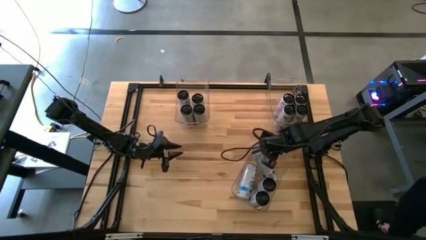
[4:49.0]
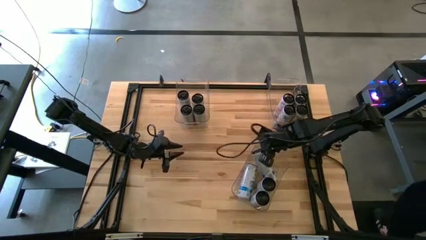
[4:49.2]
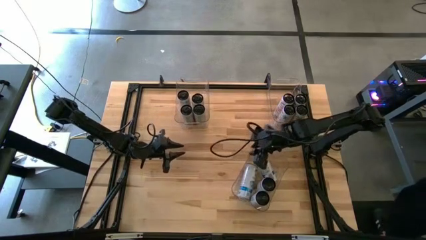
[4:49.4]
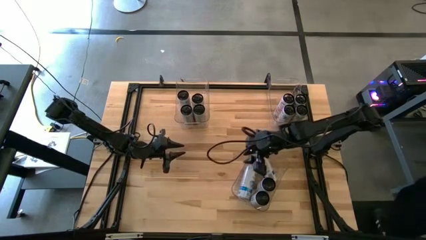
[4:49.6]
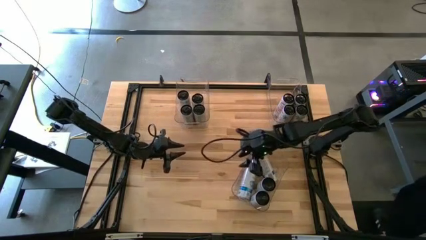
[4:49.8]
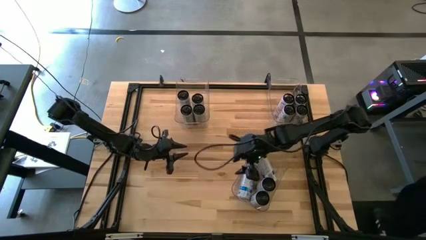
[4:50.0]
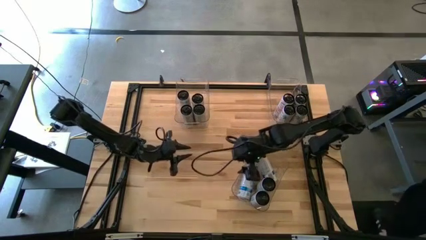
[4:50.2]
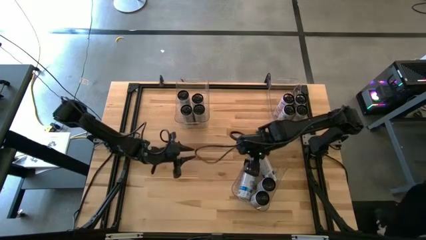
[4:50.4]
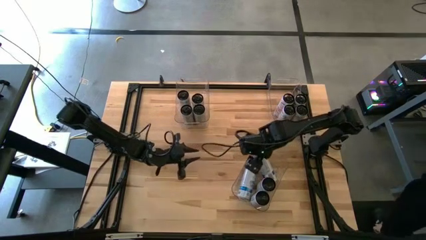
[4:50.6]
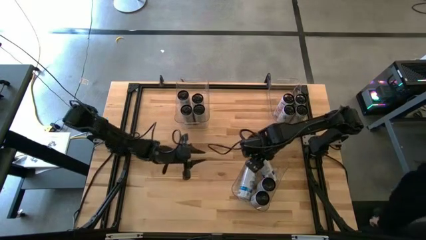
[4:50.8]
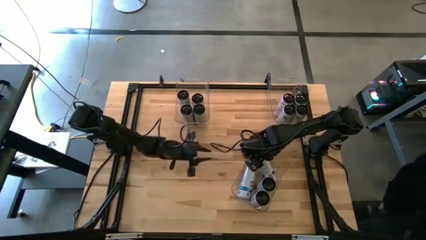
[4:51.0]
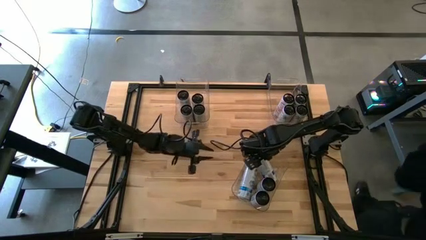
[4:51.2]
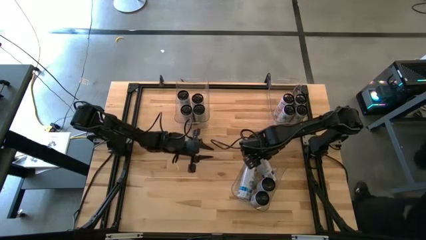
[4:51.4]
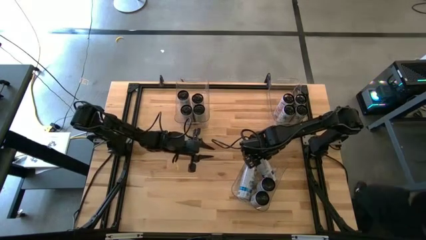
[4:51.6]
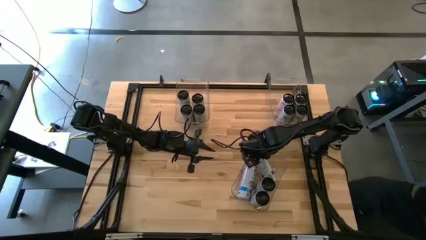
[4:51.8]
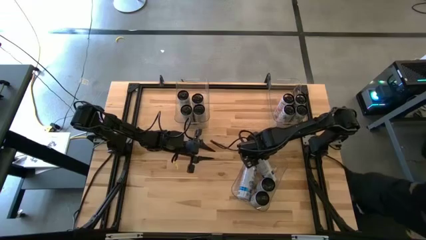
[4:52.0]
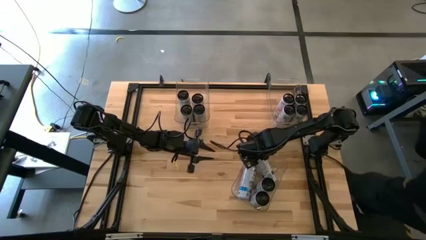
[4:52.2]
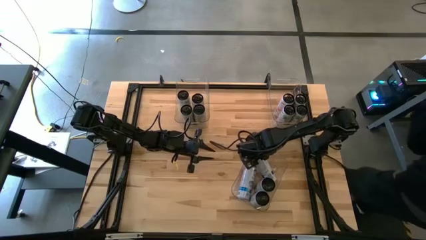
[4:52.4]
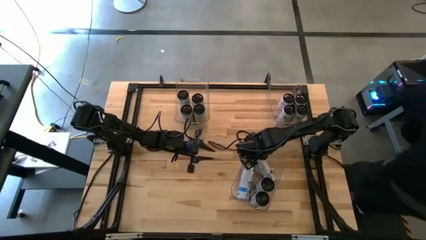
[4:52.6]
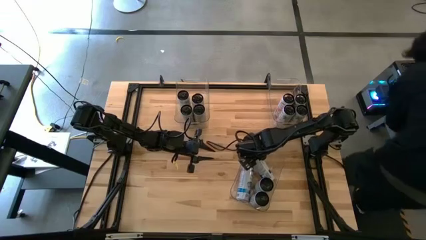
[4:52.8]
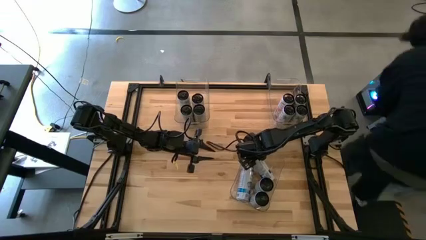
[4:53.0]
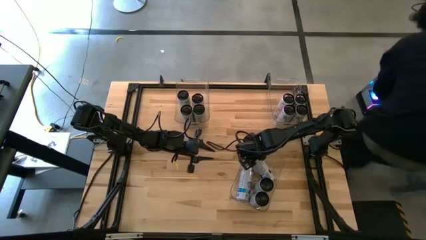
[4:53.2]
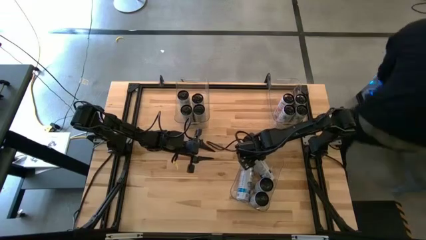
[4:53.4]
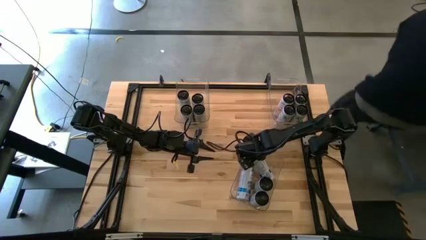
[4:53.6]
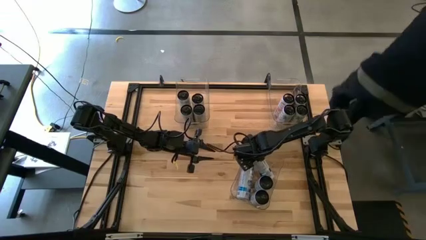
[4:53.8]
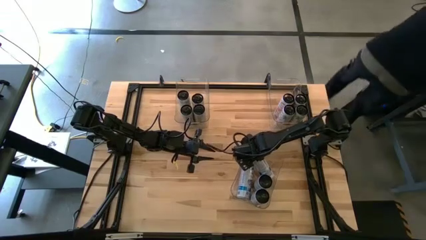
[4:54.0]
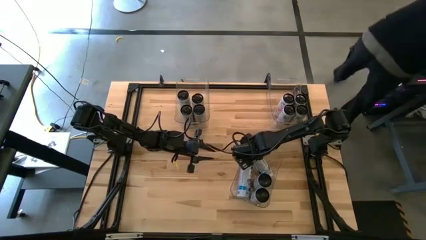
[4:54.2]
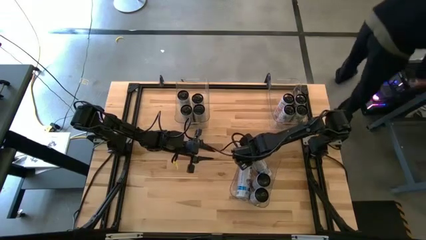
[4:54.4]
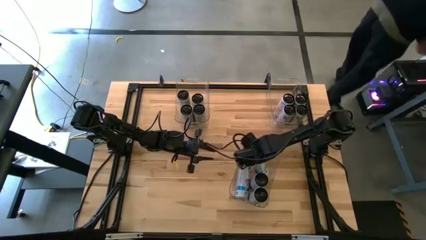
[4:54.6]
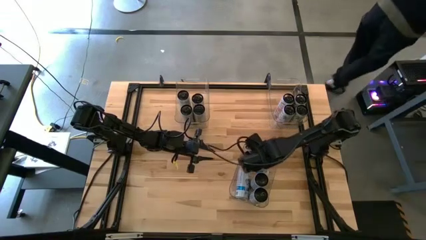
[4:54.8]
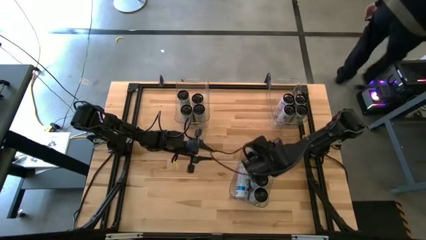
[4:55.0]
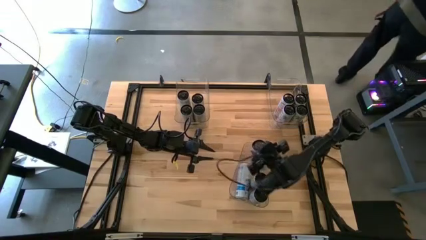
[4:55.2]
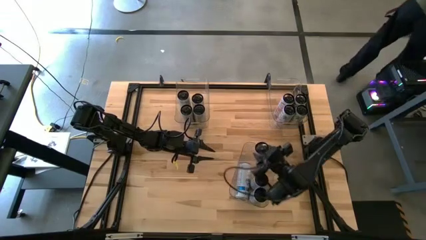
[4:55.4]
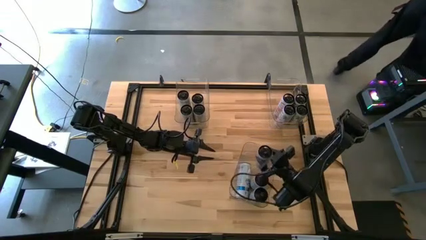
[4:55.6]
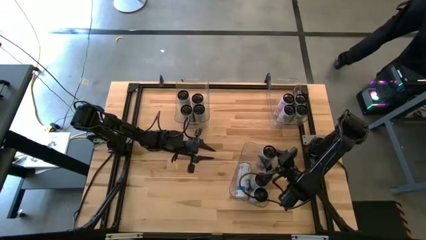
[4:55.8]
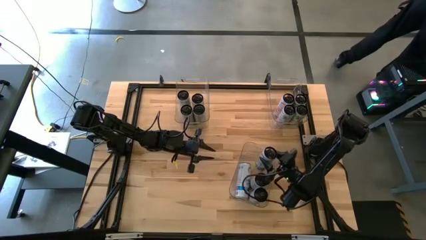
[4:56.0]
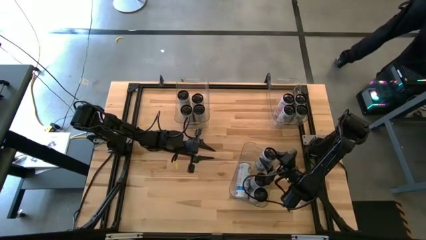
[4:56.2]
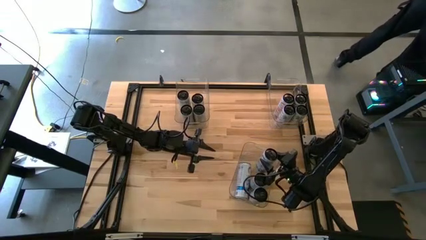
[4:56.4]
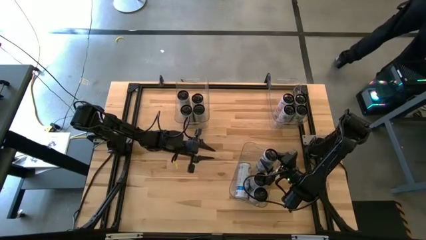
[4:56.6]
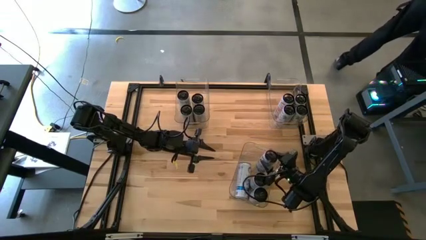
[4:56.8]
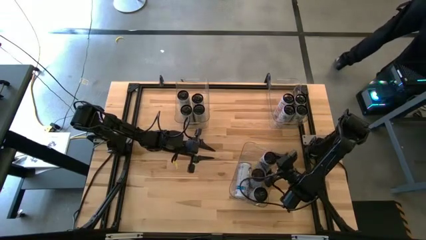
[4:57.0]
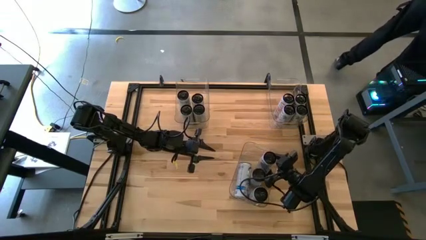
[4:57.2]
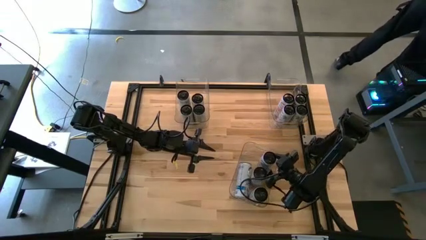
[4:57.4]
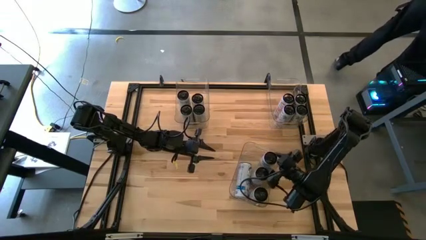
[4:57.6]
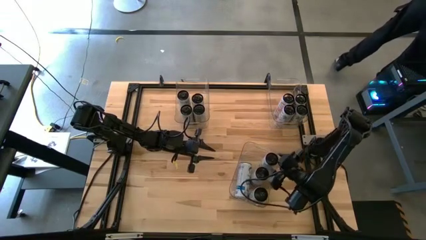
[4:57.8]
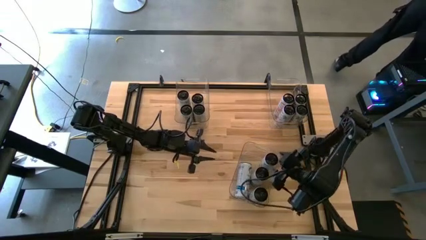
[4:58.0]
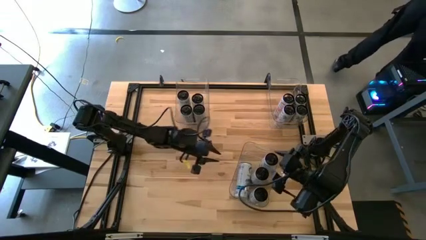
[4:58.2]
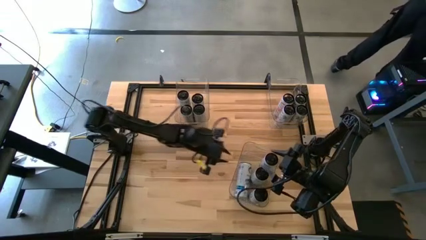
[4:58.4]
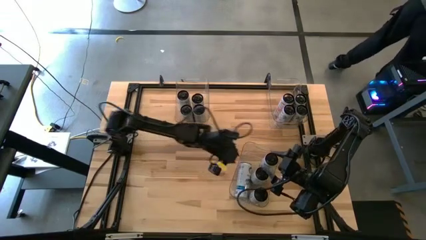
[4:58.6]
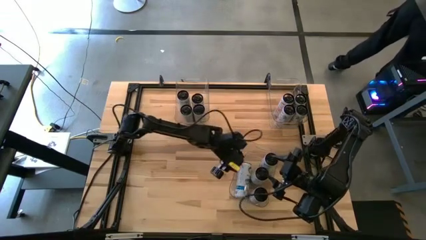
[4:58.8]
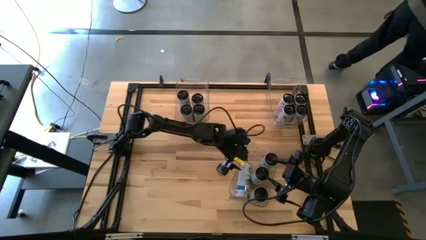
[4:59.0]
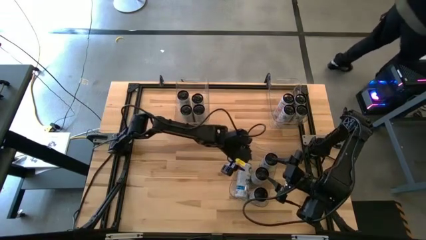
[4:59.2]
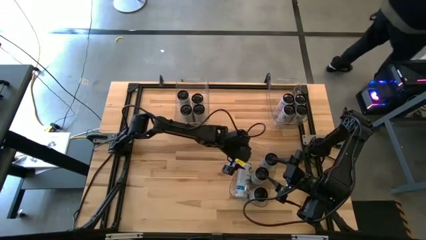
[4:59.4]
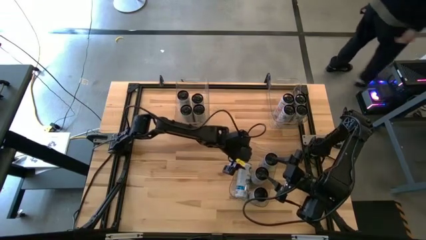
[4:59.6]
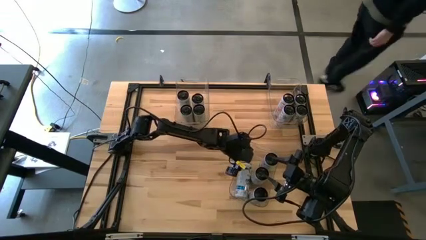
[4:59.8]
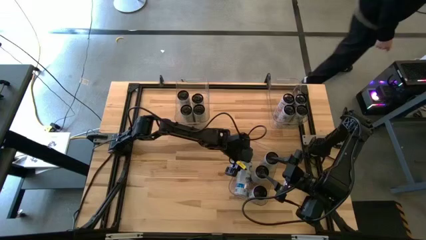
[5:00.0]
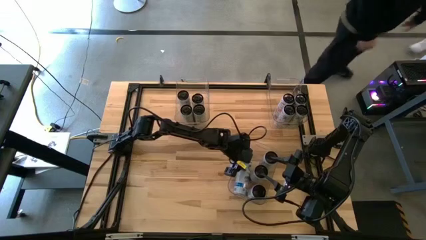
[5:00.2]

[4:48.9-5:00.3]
Task: Sort soda cans
Adjust the white/blue soda cans
